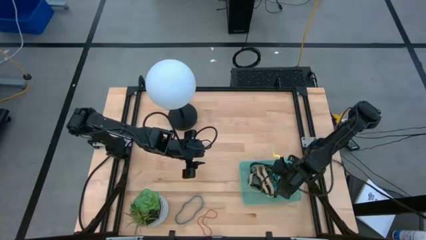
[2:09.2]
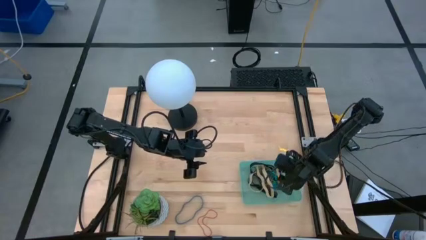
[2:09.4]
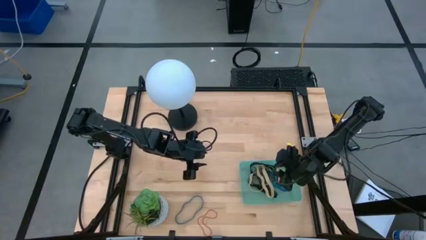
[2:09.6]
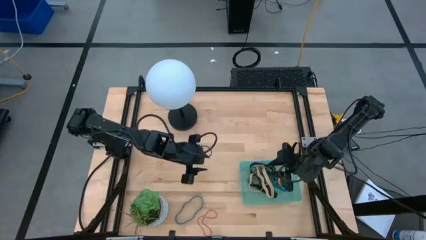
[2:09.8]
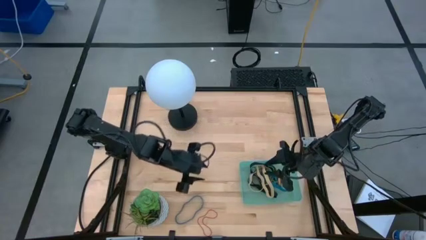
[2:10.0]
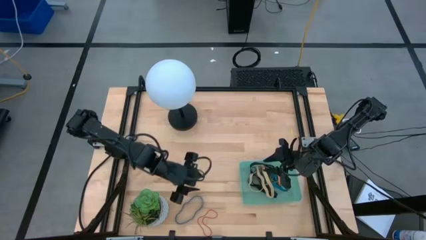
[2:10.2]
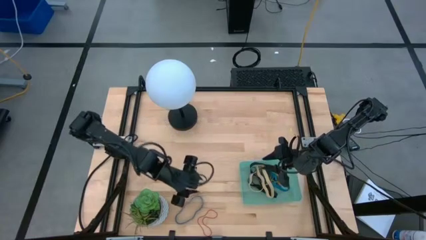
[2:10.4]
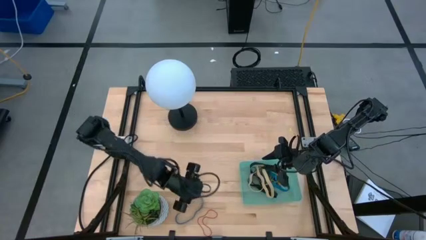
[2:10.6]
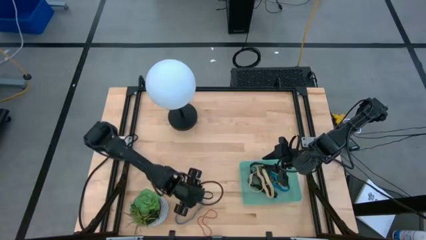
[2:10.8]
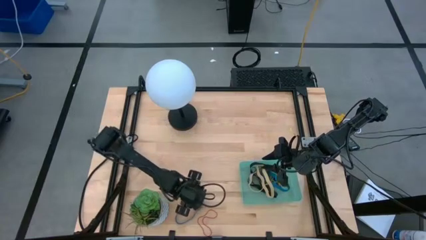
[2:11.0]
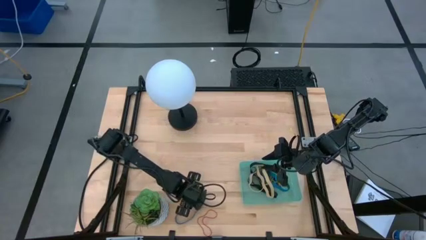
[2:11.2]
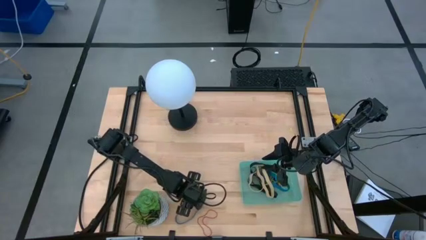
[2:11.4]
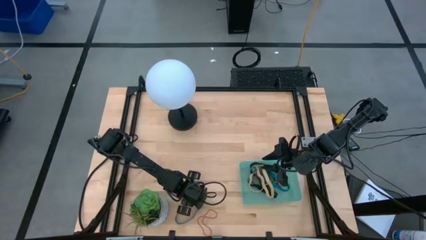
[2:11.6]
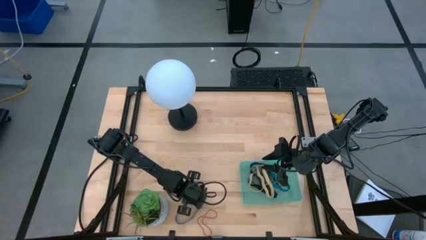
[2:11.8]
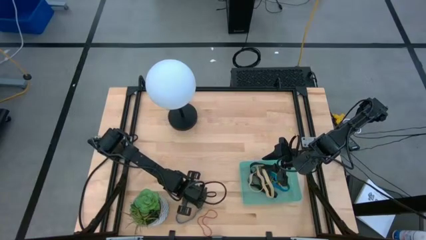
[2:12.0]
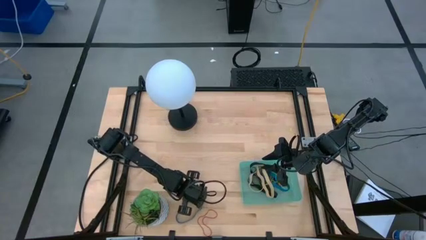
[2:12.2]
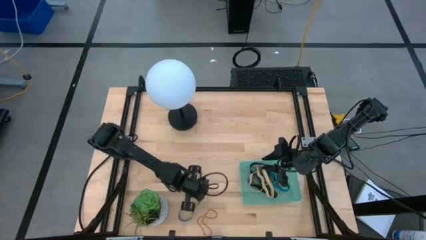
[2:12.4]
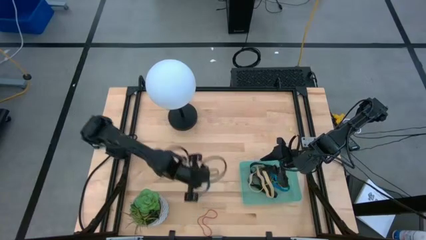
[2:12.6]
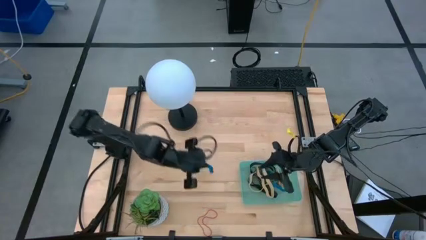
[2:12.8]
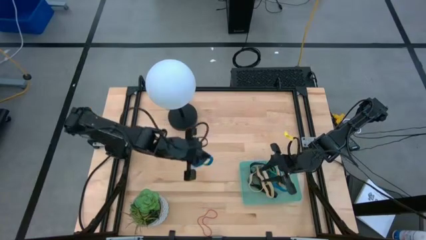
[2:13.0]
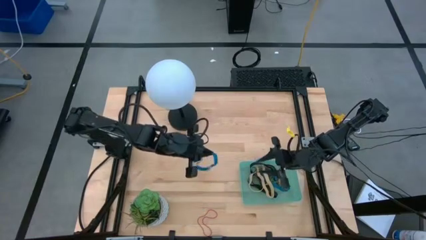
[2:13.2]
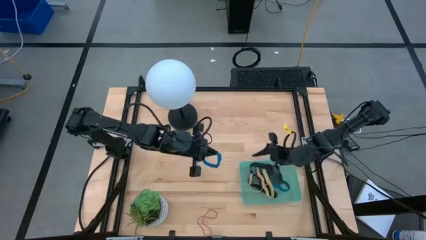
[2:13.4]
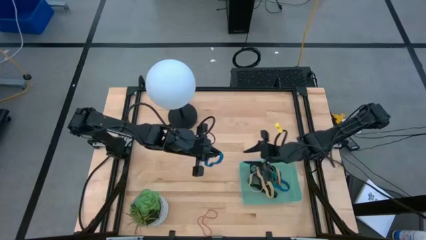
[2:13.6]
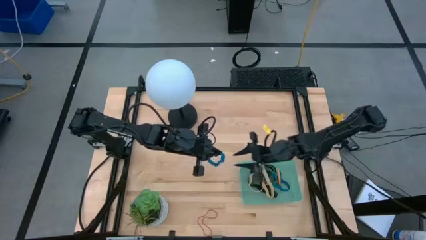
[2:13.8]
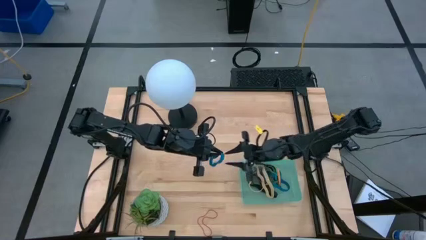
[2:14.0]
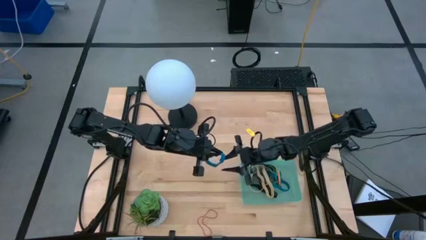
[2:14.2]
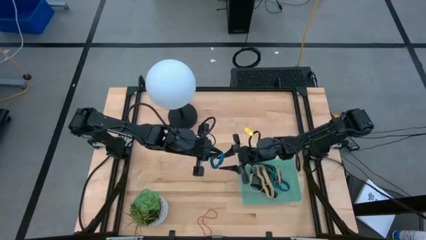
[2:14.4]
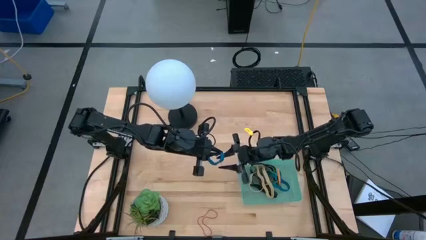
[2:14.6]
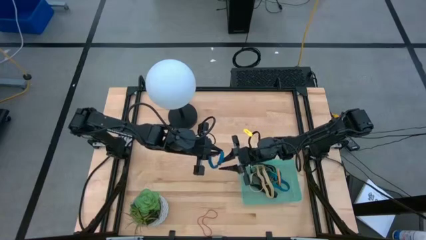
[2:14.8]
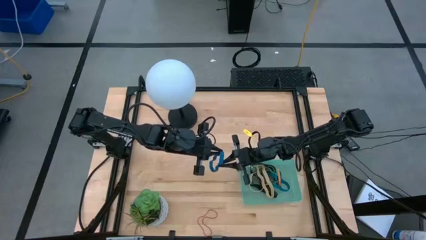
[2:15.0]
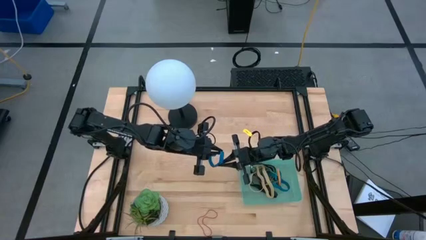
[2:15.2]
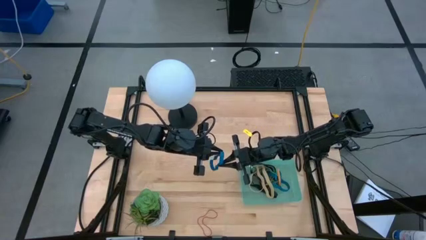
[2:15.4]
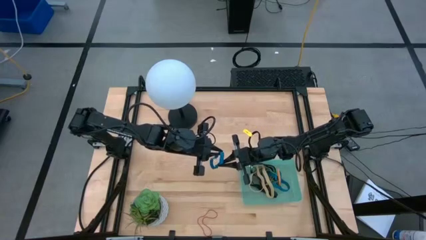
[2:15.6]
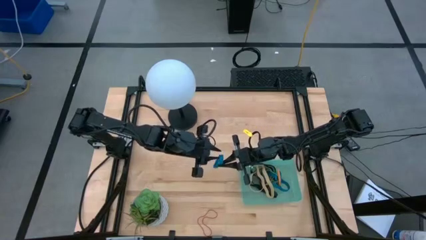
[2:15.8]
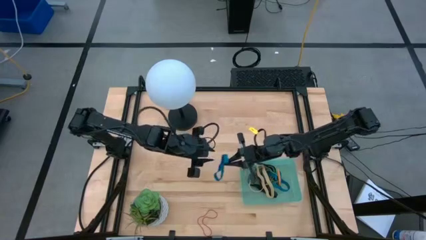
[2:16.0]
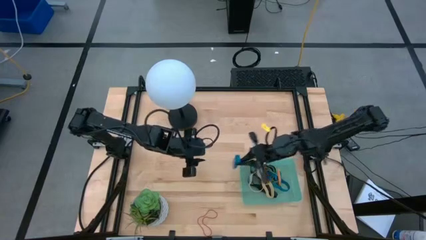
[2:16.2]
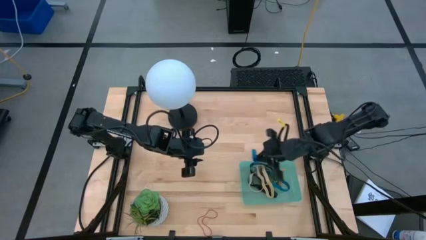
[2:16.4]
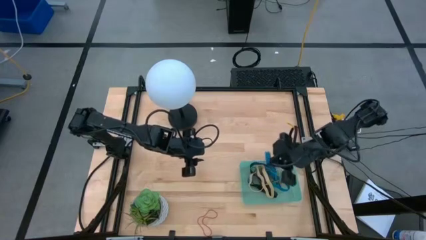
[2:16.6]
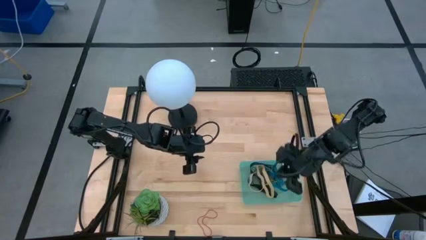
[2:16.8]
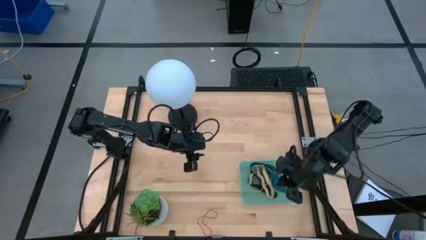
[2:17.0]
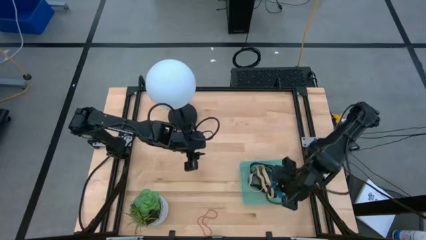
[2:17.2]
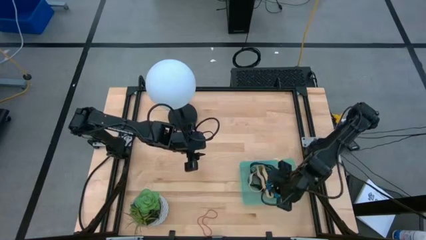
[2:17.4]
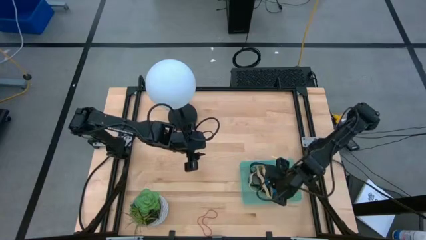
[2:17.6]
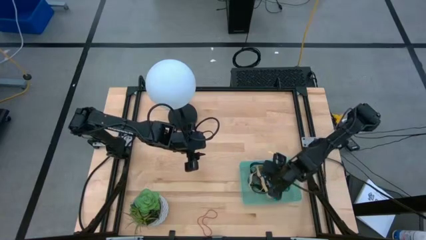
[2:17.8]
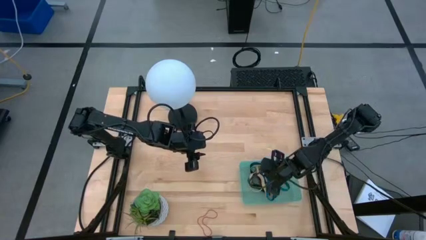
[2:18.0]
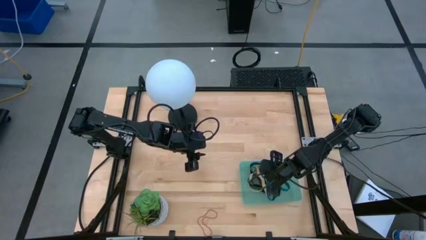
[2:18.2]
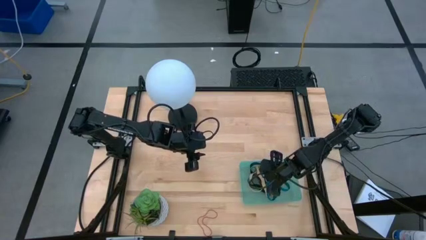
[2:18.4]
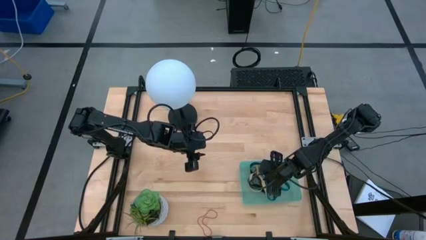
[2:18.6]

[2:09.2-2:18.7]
Task: Pick and place rubber bands into bin
Put the blue rubber band into the green bin

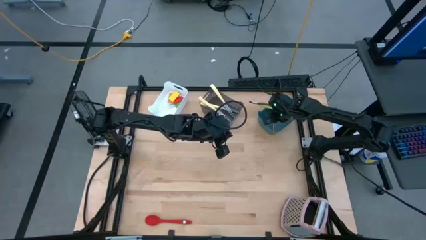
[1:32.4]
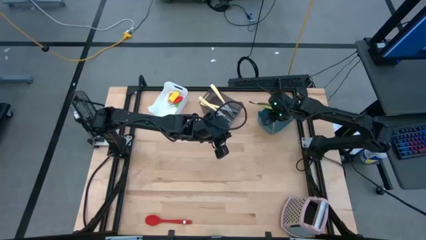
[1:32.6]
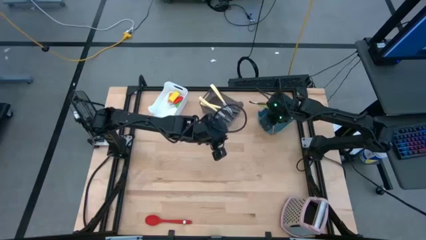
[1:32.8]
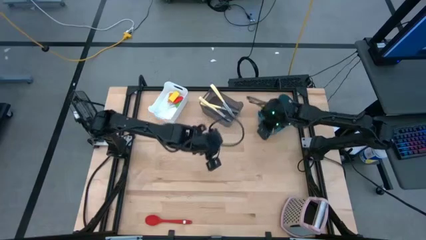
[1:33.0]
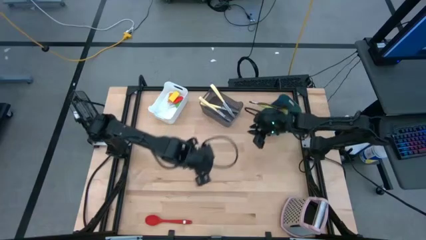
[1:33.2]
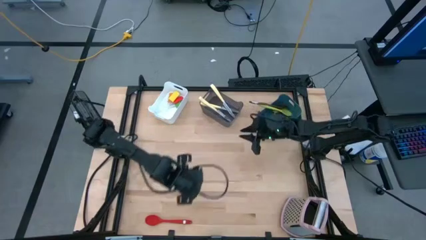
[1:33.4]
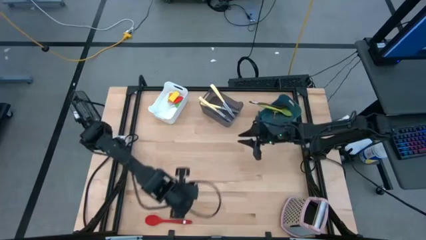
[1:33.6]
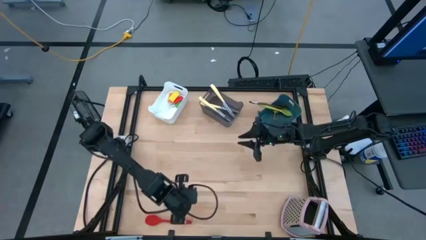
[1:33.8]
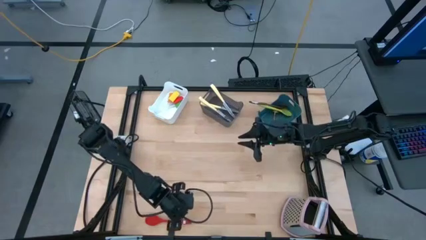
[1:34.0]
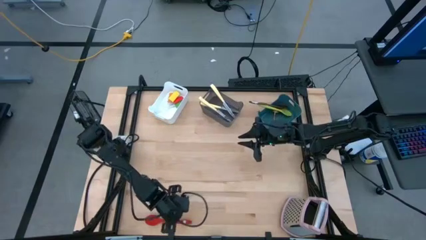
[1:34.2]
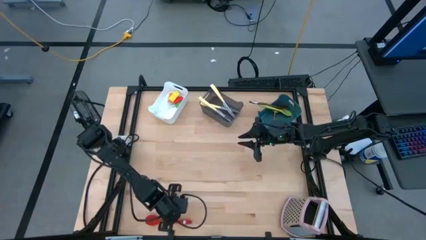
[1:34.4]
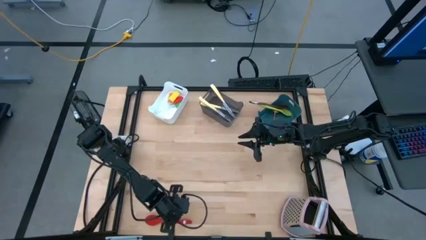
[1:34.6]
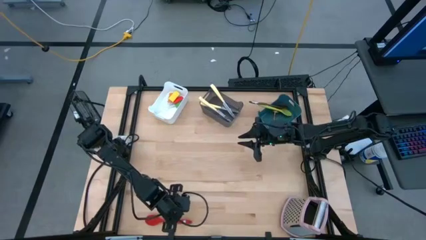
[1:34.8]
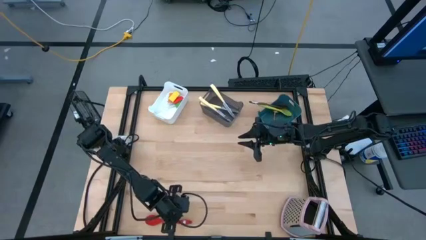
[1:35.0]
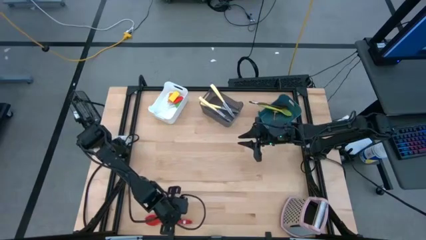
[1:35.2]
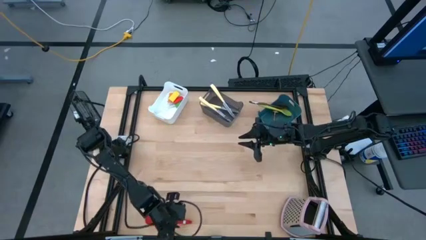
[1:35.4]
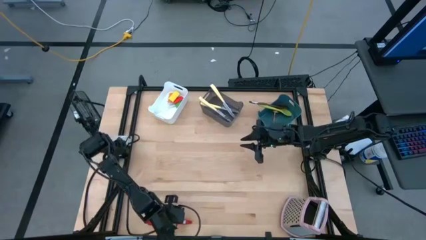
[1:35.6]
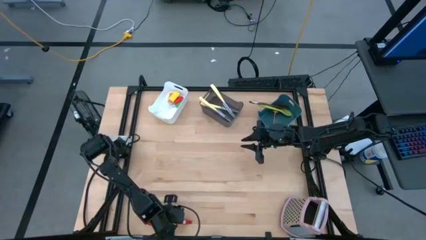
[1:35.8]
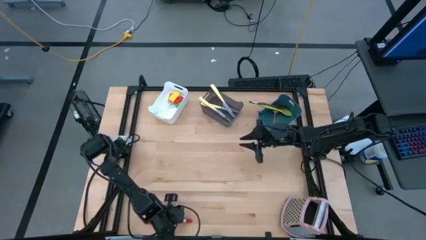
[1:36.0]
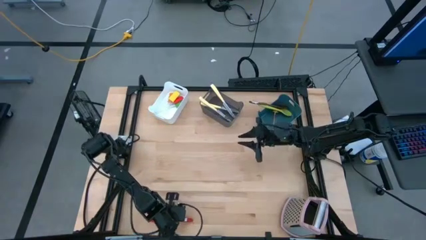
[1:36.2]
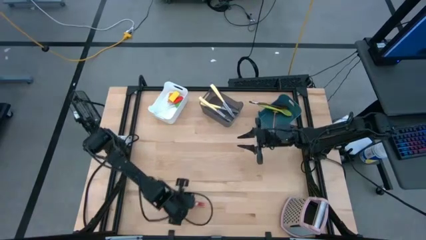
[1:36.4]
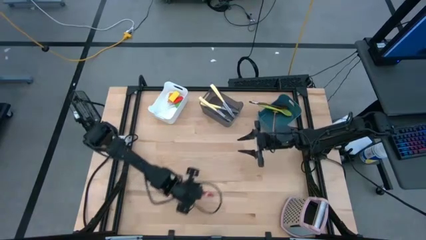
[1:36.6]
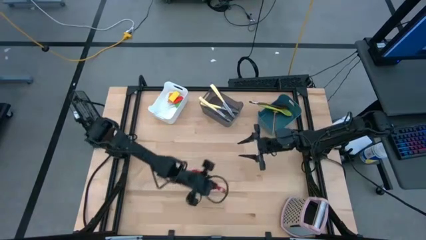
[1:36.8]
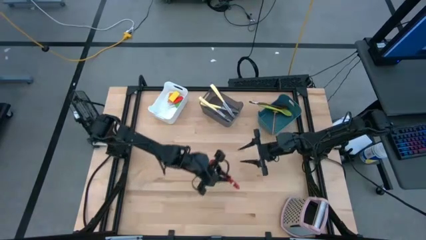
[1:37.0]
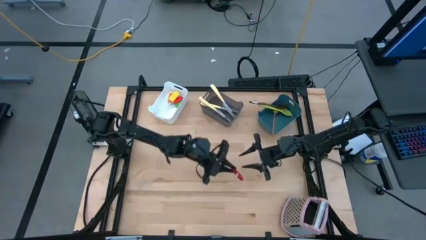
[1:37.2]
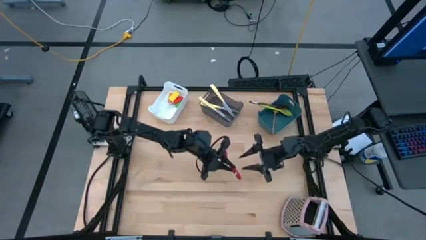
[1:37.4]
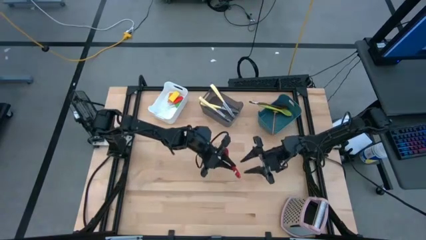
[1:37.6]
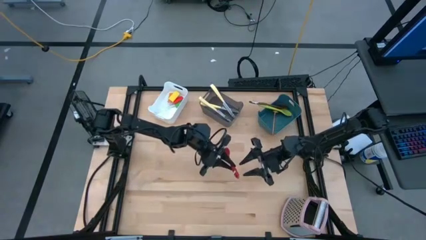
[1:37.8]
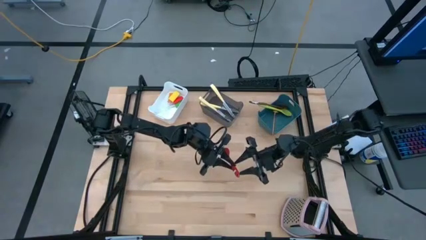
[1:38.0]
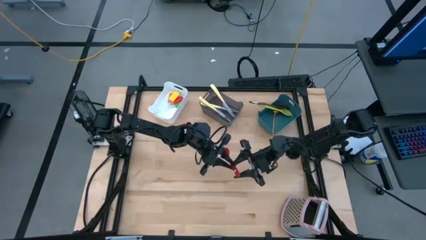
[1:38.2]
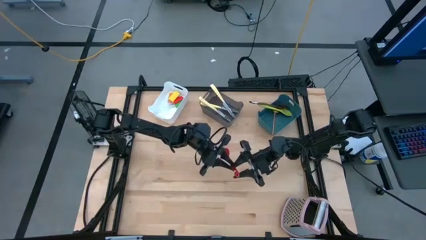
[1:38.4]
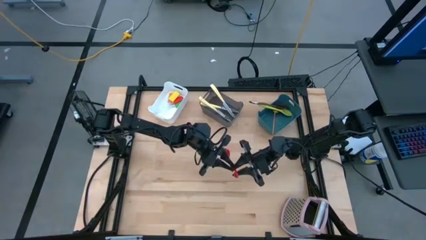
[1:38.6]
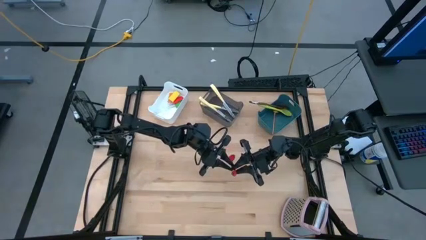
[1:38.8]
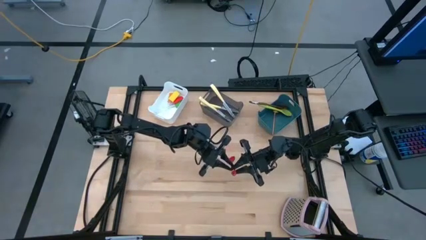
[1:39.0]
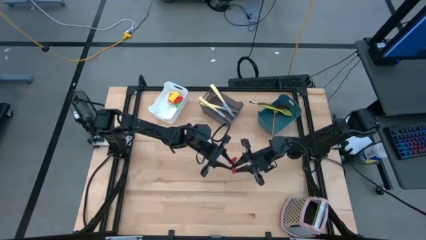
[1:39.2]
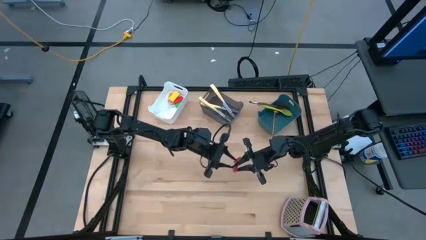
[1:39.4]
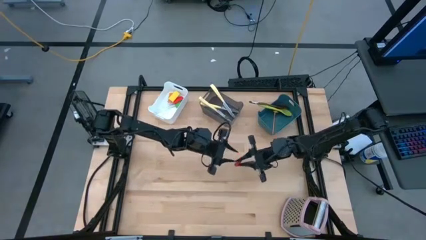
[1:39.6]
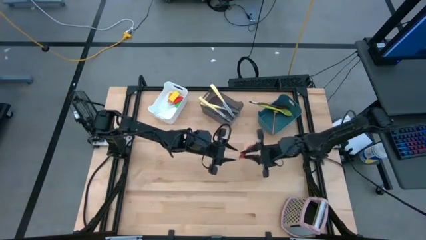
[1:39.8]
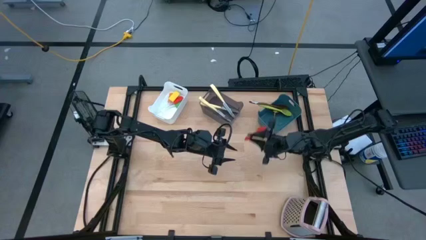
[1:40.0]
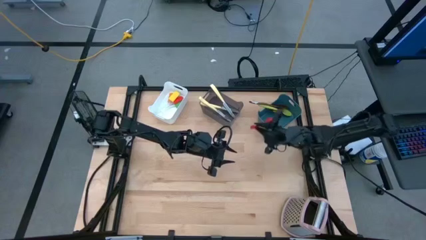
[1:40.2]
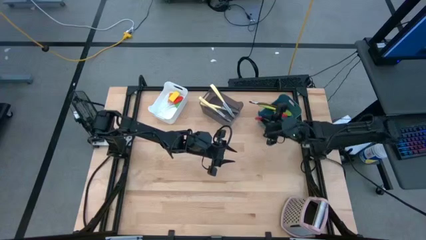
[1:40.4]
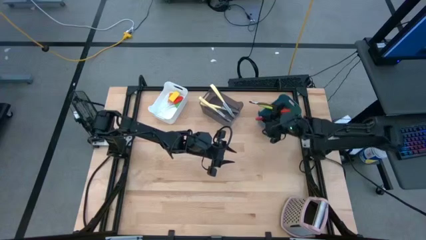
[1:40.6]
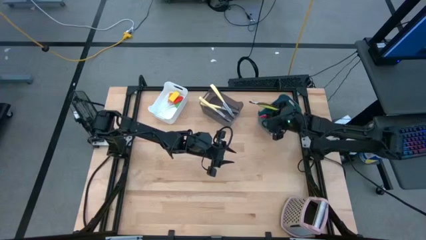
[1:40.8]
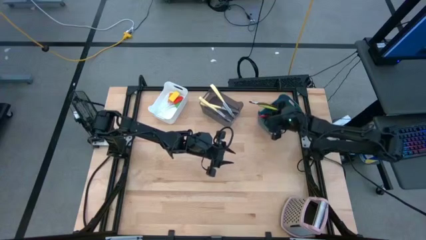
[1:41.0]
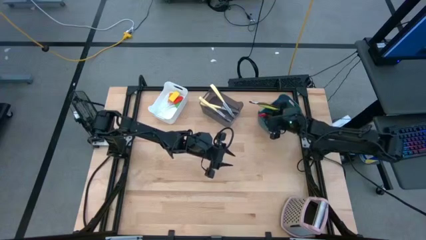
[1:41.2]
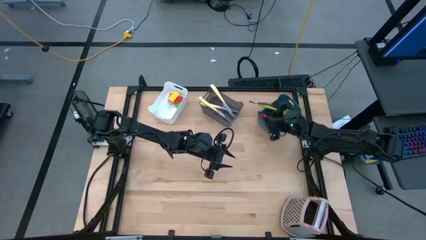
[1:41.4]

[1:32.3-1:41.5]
Task: Pick & Place Kitchen Items
Put the red serving spoon into the blue bin
